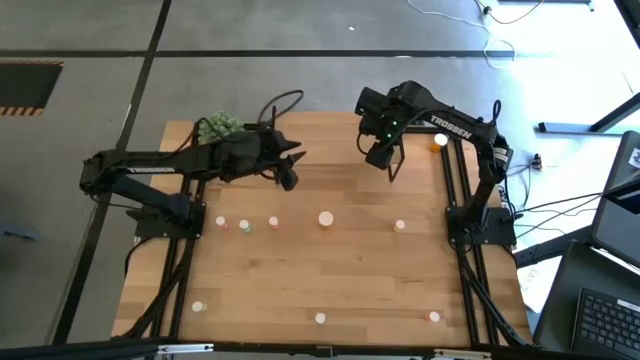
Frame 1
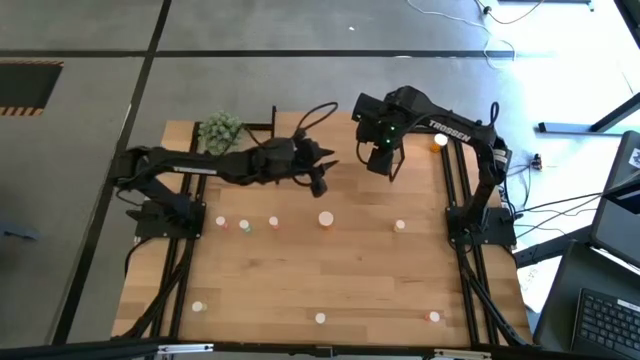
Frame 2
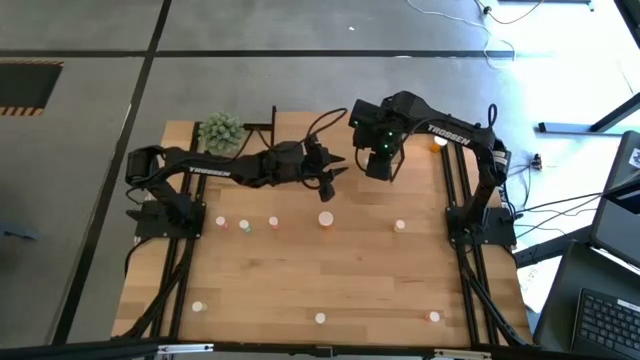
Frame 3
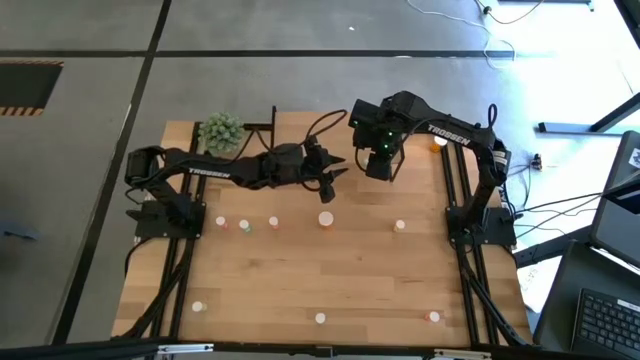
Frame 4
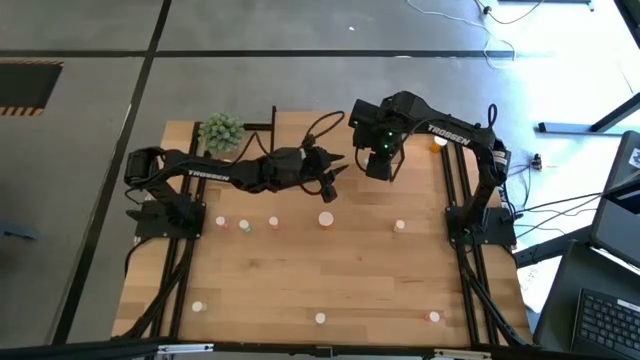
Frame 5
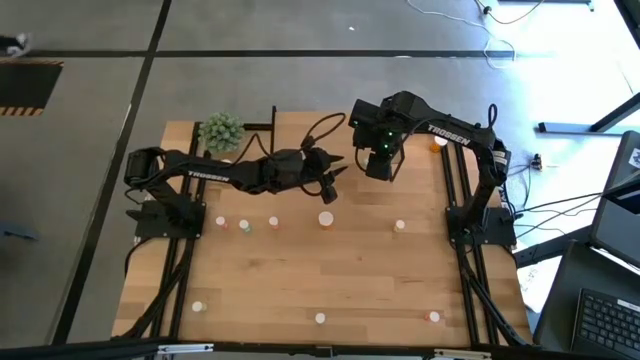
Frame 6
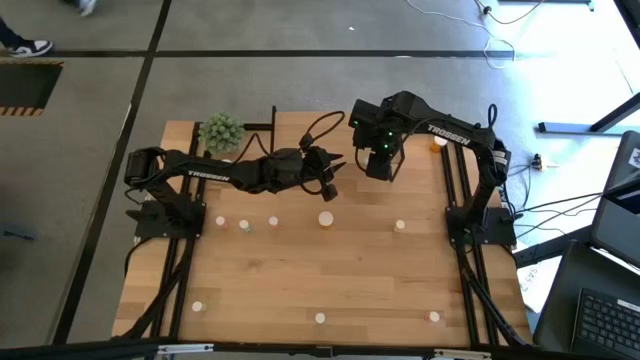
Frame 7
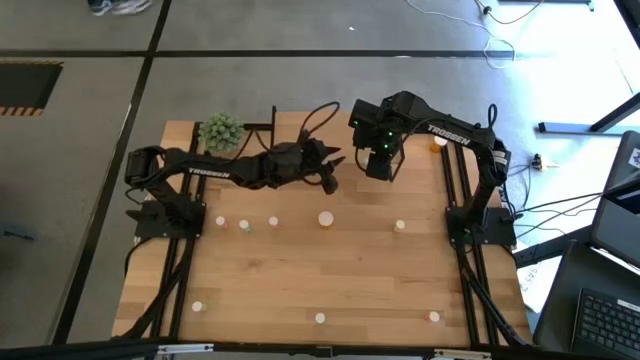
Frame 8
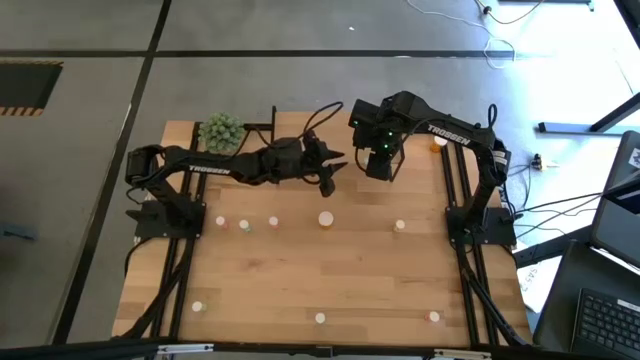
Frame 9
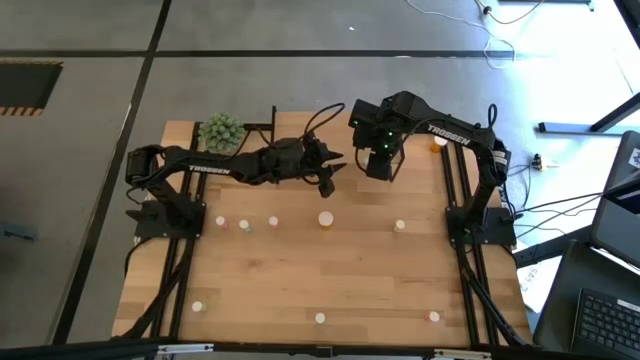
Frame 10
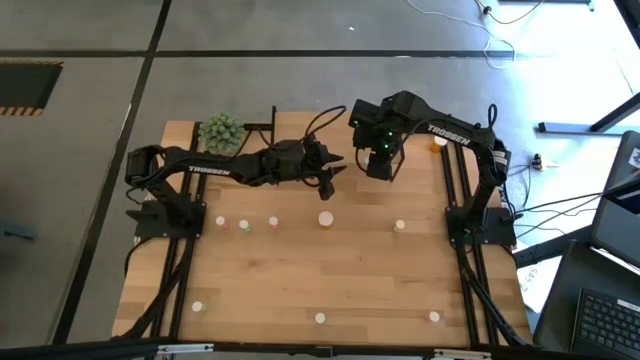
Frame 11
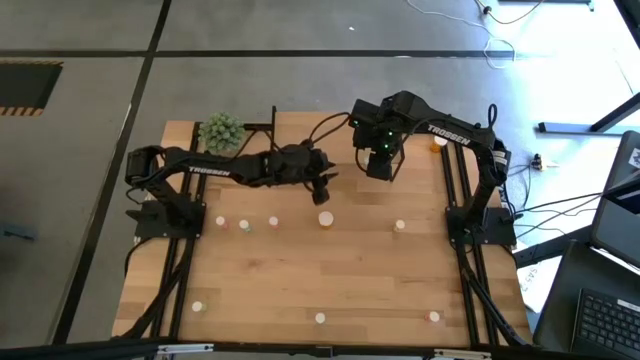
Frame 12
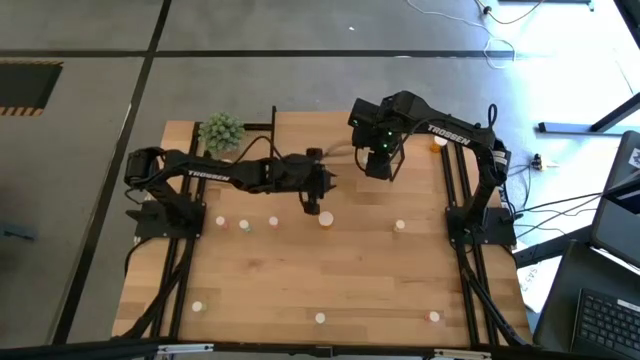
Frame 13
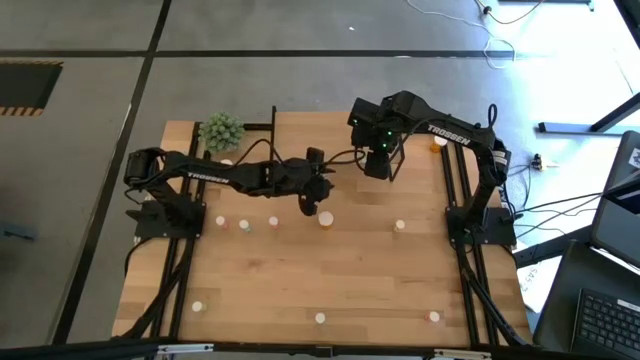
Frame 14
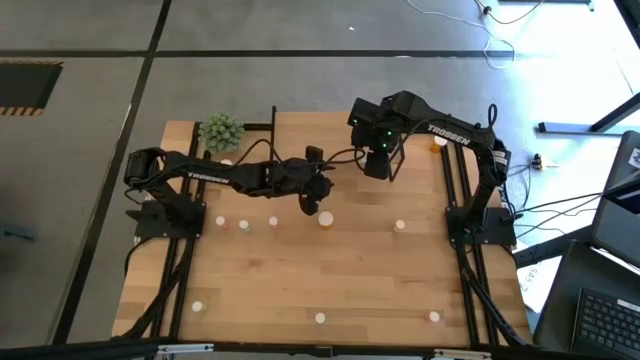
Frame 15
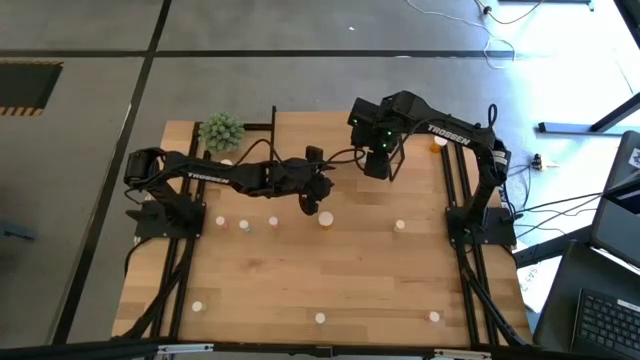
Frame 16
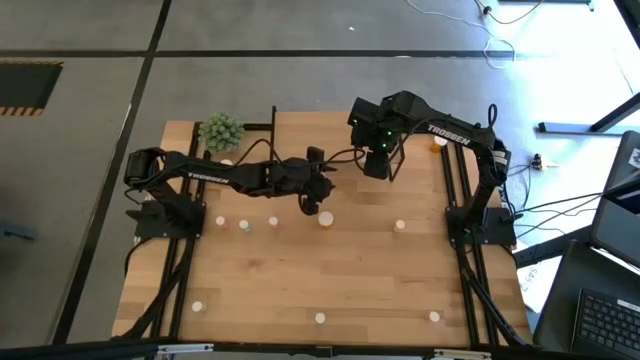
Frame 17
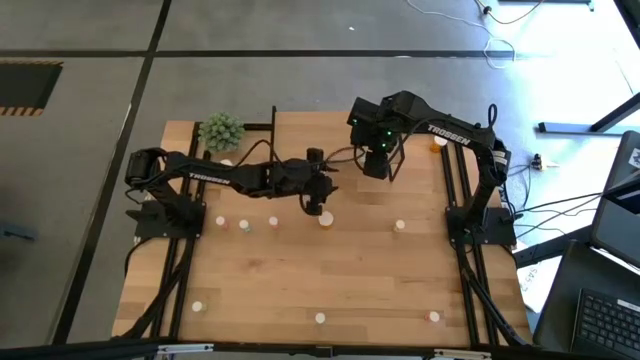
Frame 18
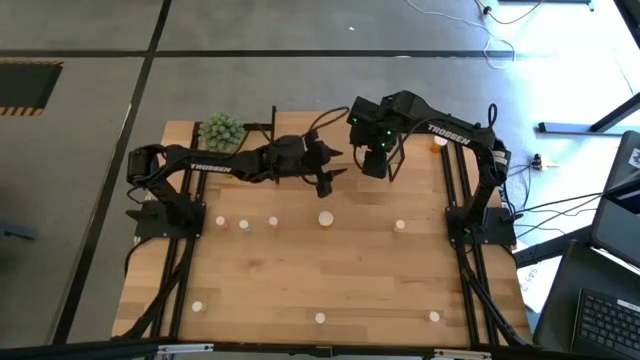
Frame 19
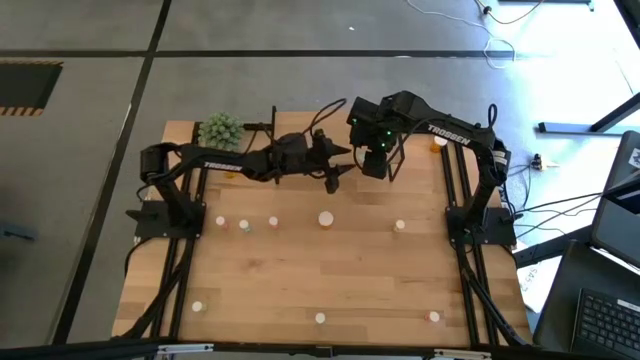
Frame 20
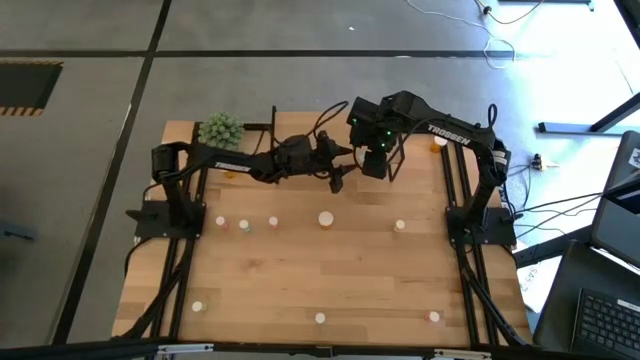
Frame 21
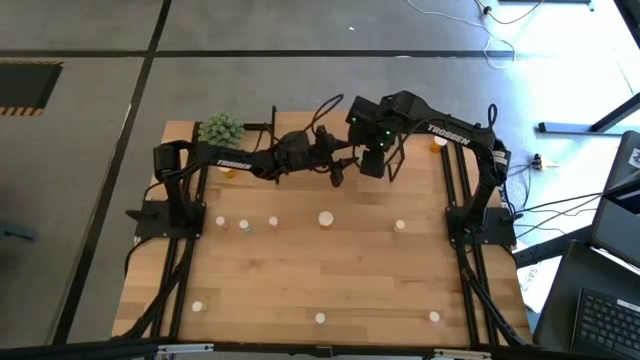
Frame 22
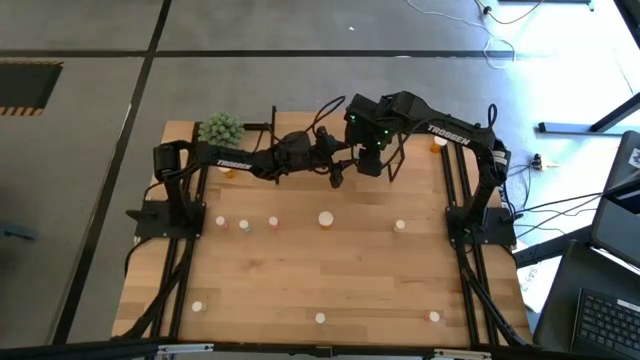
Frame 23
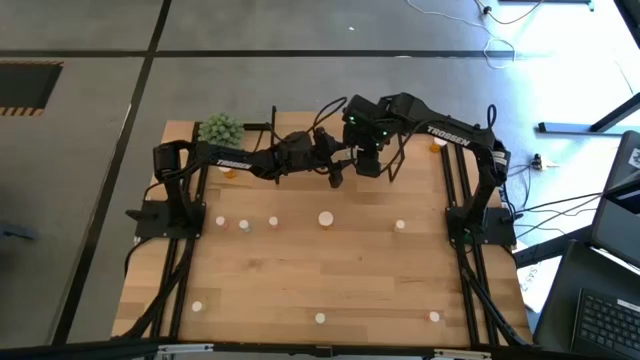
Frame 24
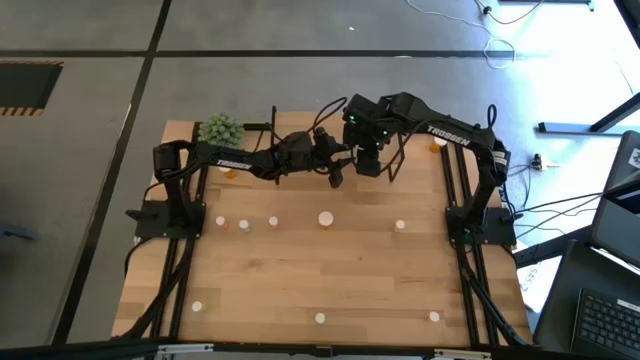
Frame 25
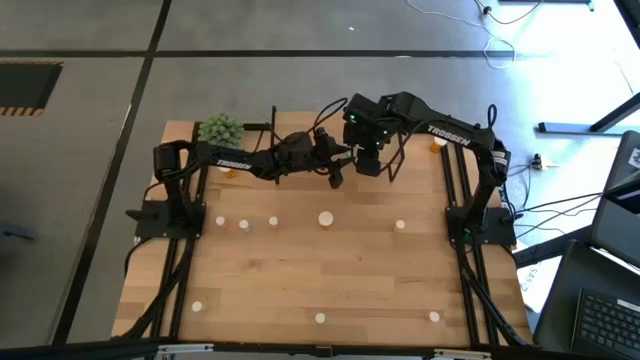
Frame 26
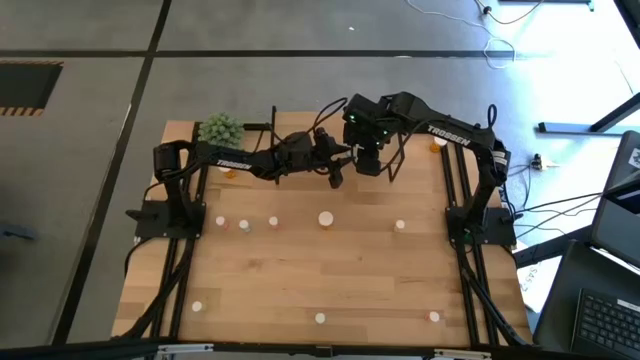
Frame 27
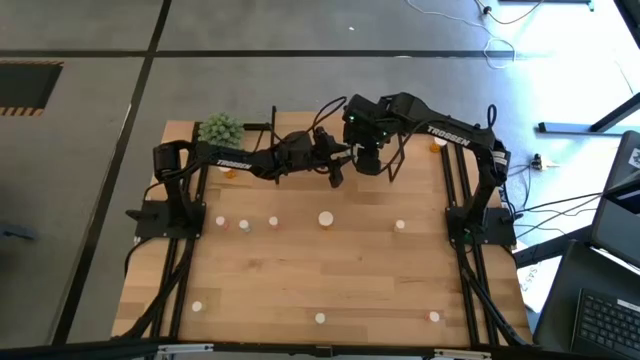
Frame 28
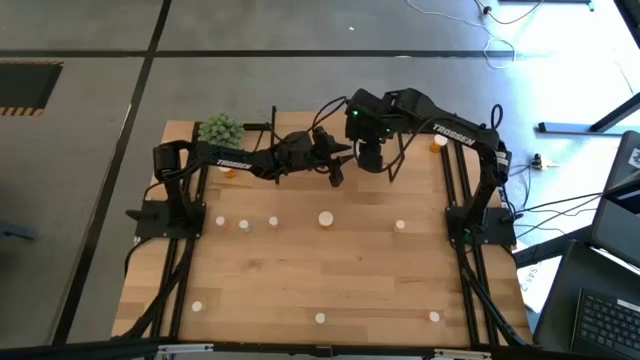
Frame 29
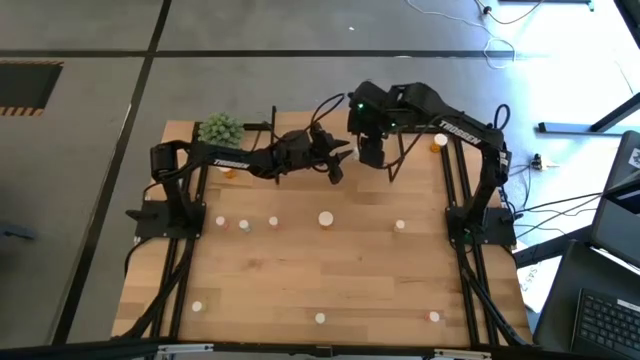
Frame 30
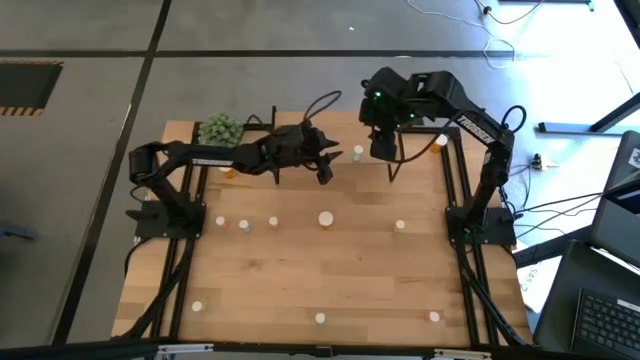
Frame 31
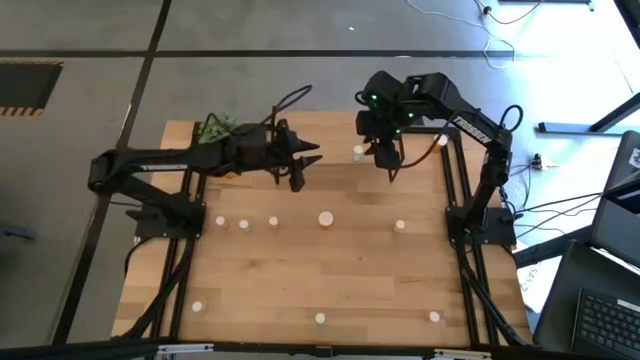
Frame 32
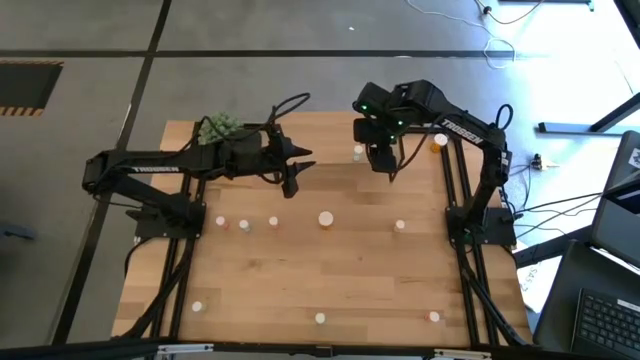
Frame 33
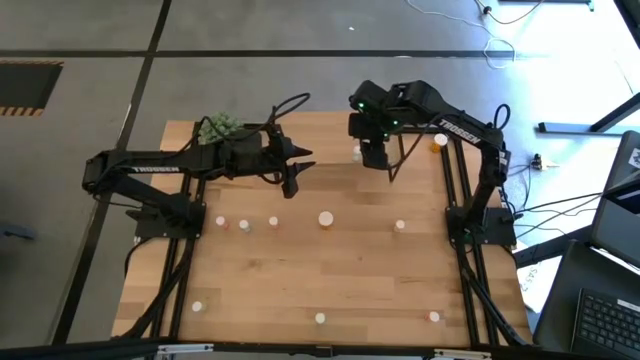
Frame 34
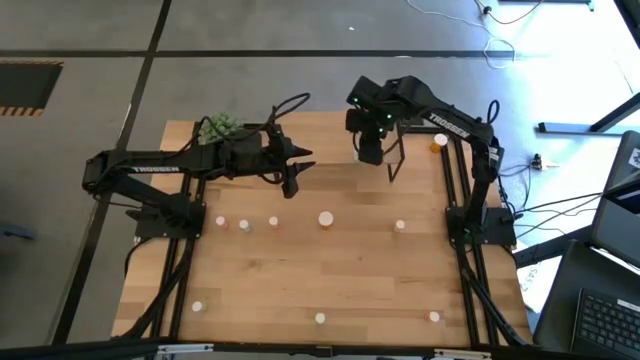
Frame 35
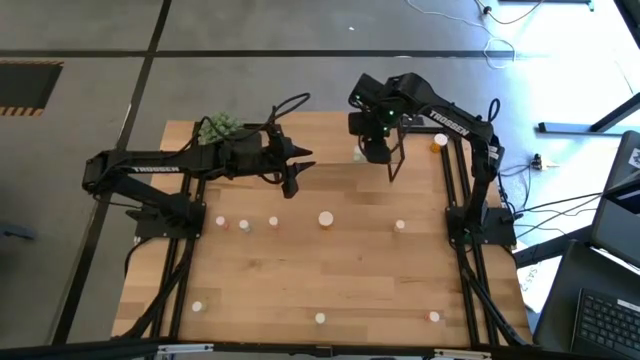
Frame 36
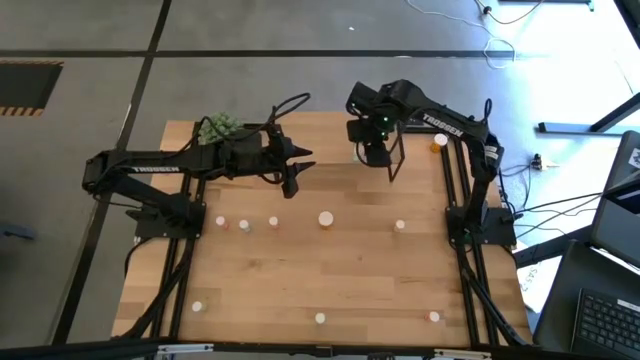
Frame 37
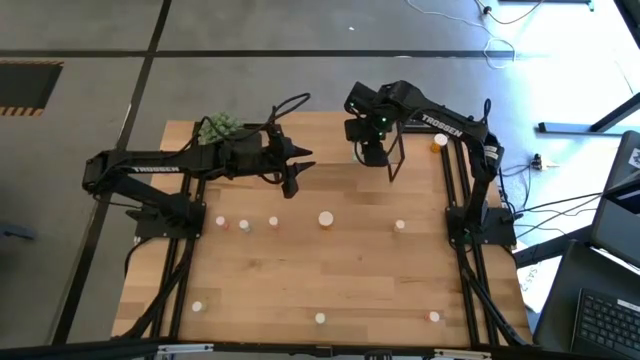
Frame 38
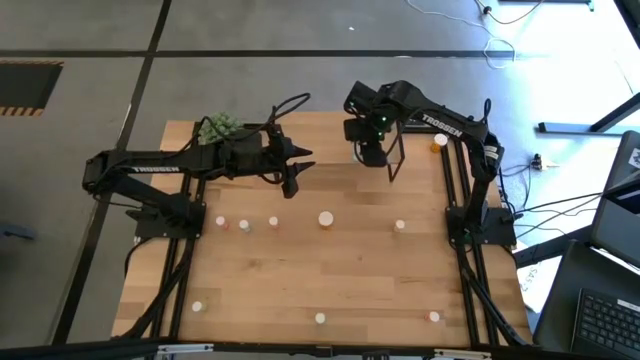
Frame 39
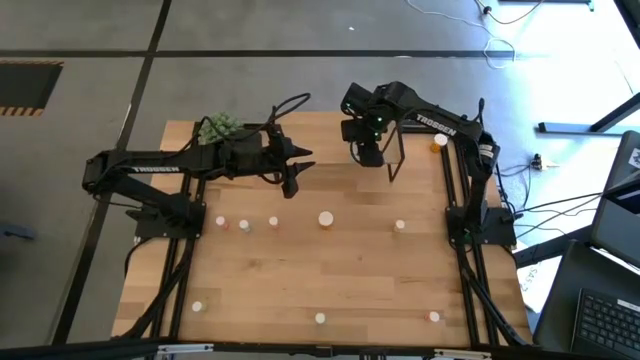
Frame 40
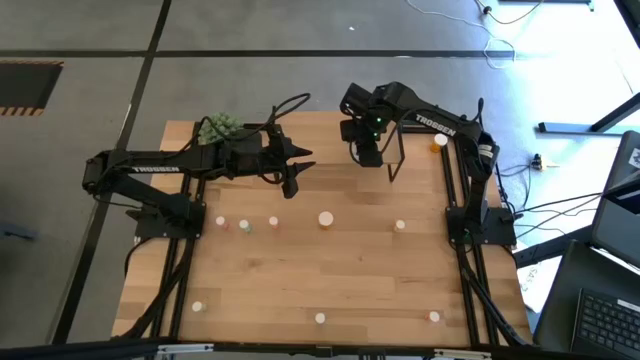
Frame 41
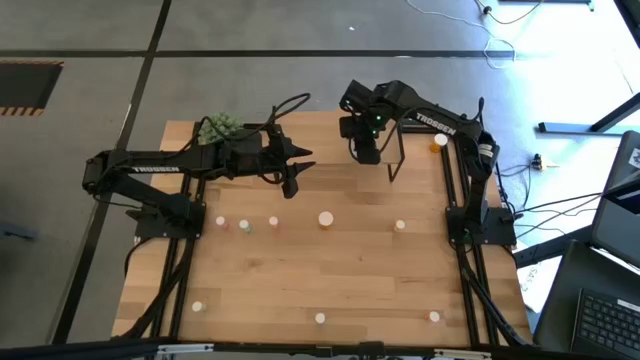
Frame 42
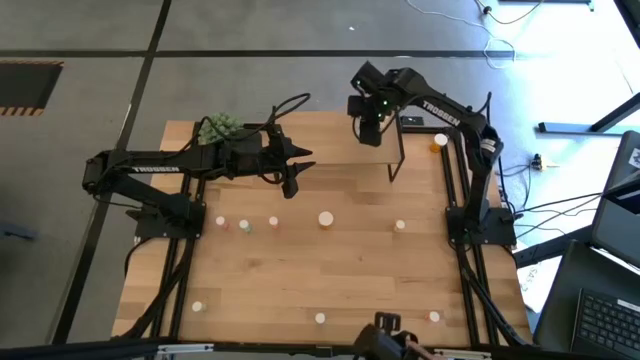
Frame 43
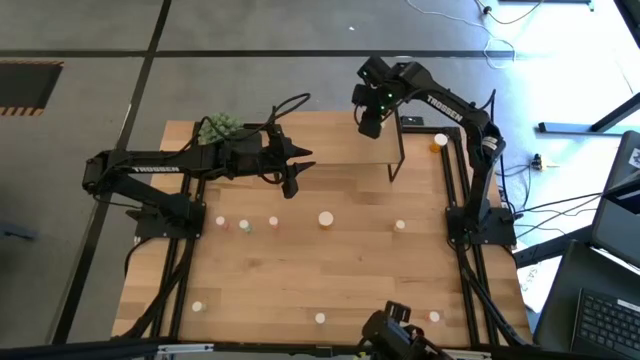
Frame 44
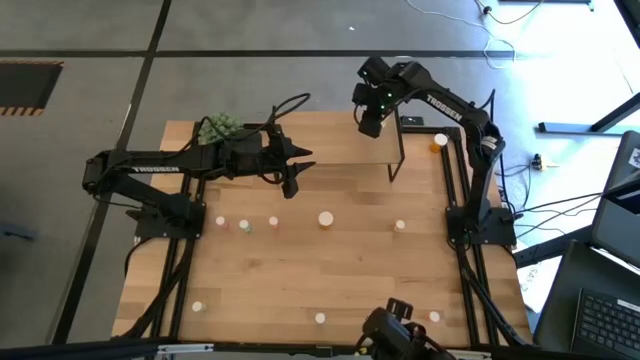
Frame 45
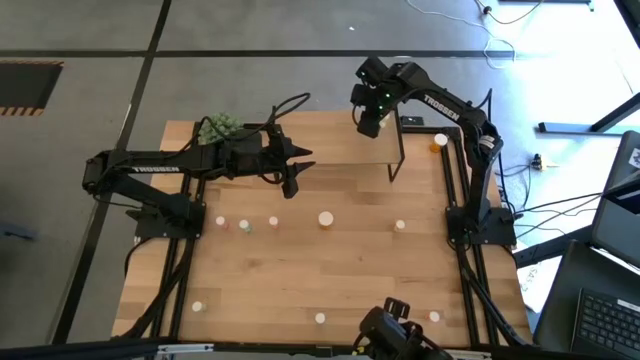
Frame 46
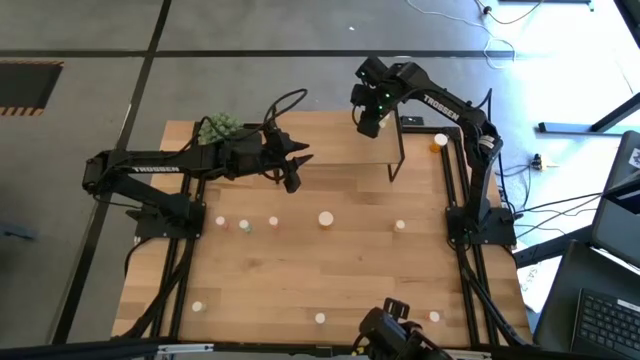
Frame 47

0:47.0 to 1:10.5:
Task: Pick and place medicine bottles onto shelf by color
Put the top right blue medicine bottle on the shelf
